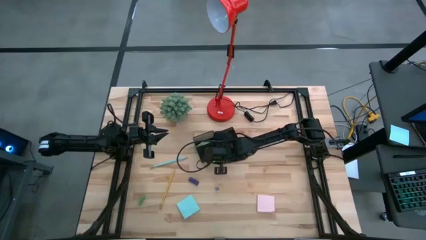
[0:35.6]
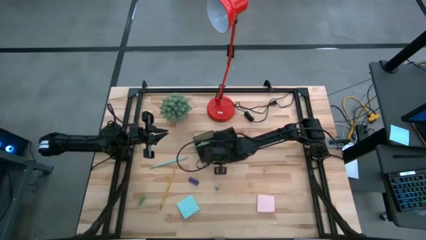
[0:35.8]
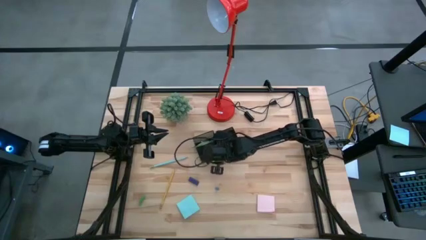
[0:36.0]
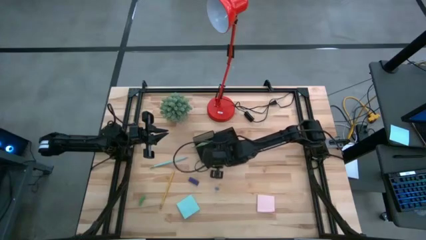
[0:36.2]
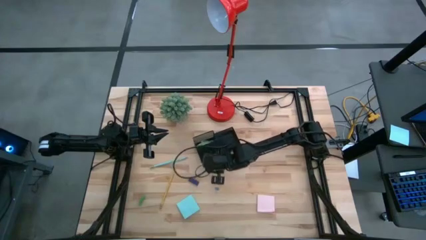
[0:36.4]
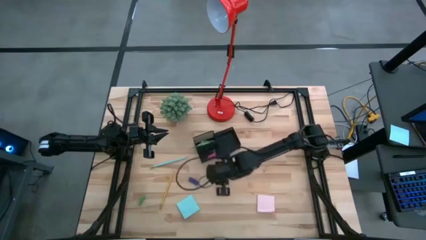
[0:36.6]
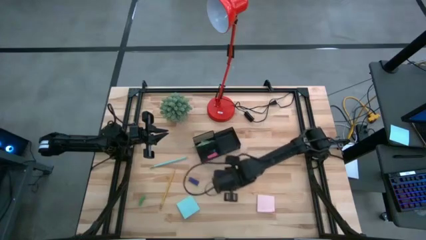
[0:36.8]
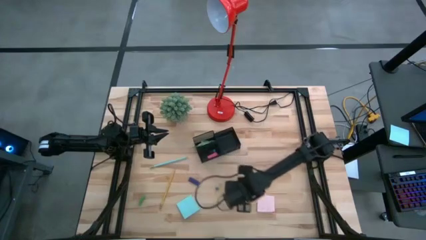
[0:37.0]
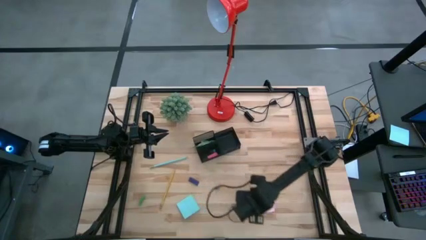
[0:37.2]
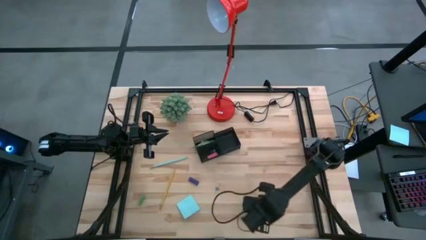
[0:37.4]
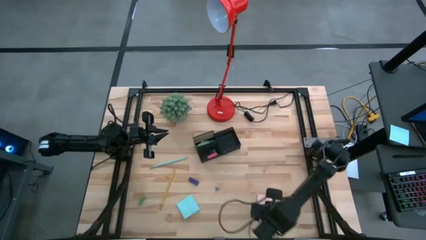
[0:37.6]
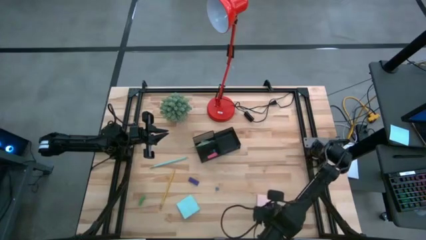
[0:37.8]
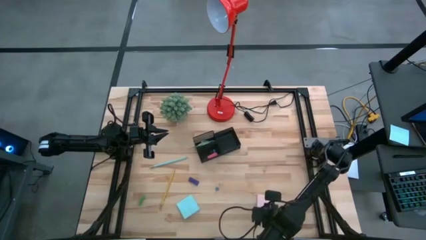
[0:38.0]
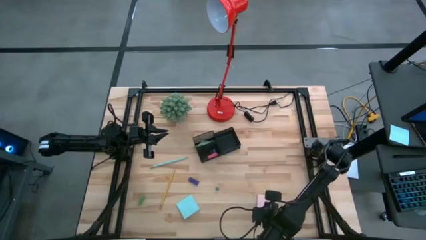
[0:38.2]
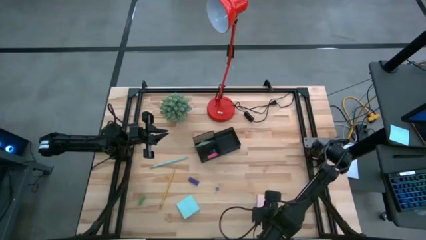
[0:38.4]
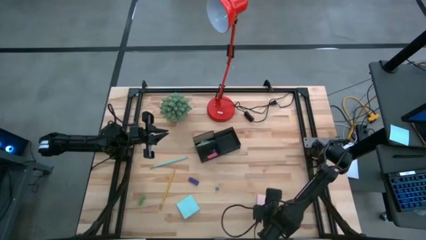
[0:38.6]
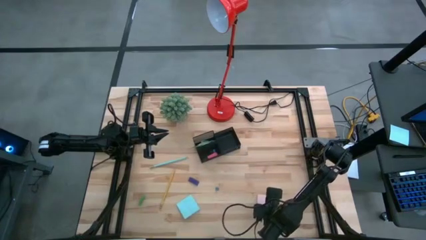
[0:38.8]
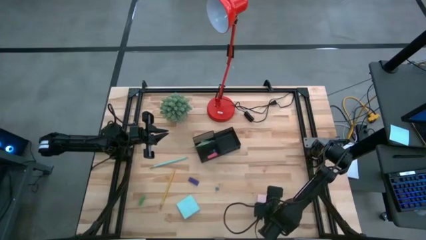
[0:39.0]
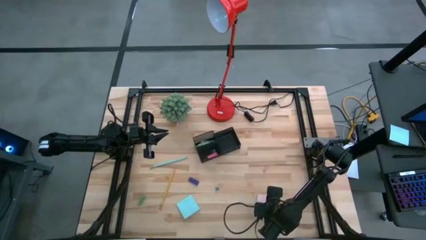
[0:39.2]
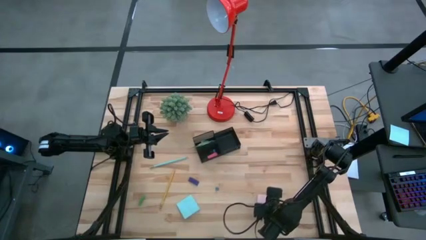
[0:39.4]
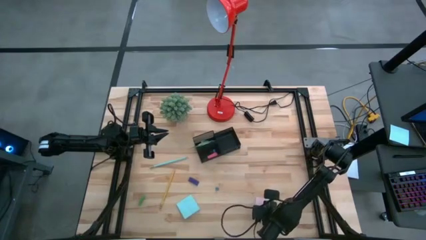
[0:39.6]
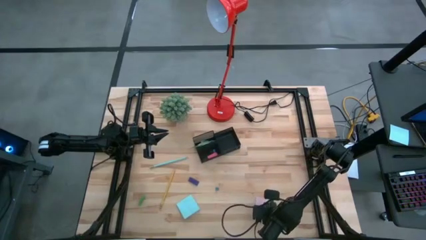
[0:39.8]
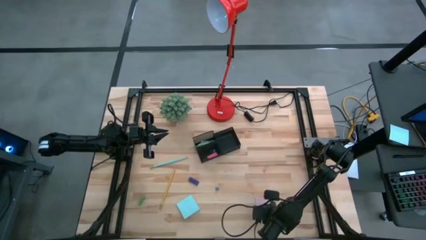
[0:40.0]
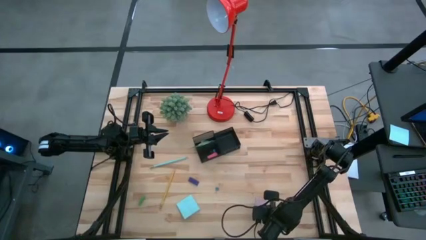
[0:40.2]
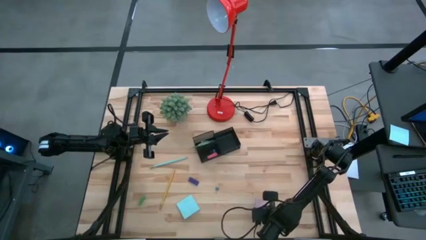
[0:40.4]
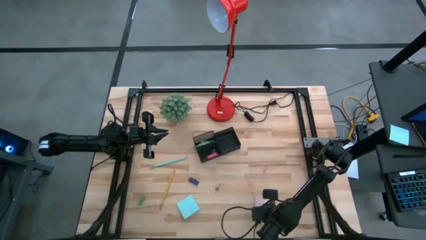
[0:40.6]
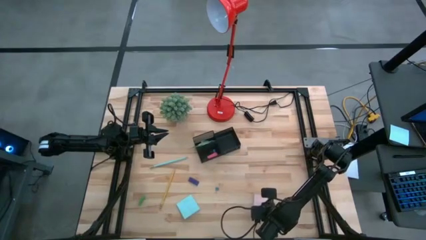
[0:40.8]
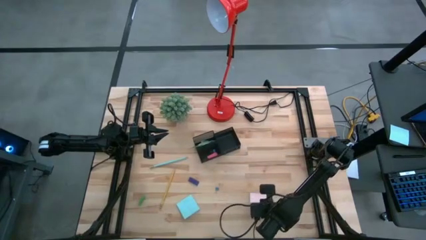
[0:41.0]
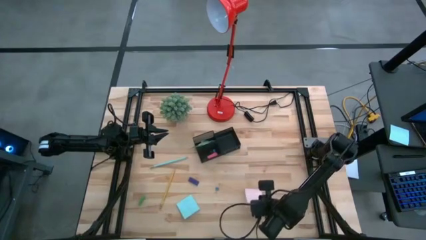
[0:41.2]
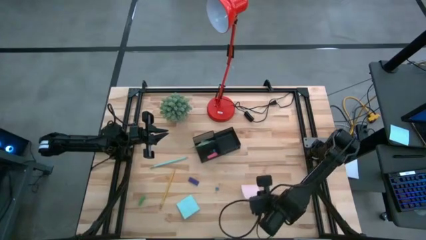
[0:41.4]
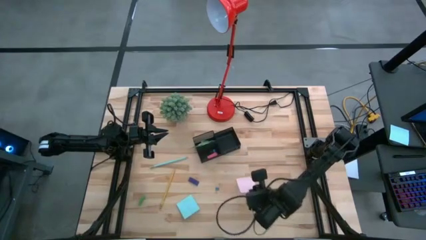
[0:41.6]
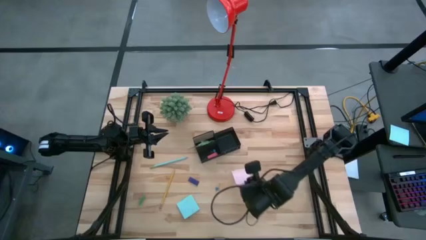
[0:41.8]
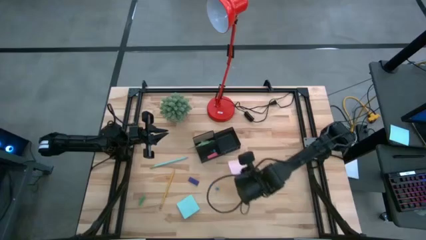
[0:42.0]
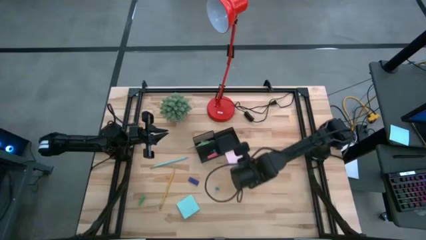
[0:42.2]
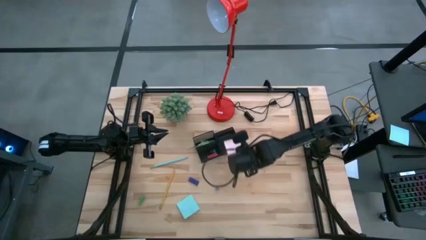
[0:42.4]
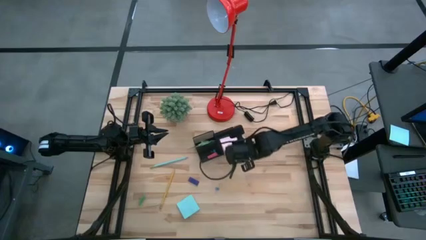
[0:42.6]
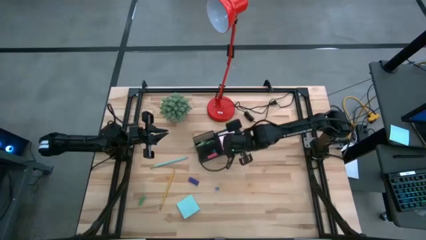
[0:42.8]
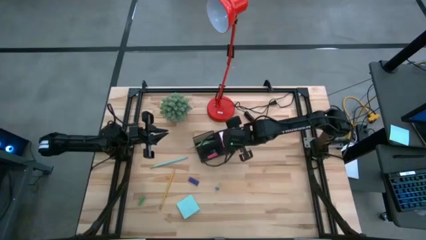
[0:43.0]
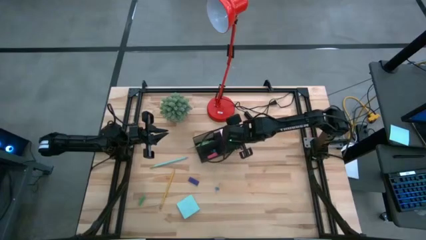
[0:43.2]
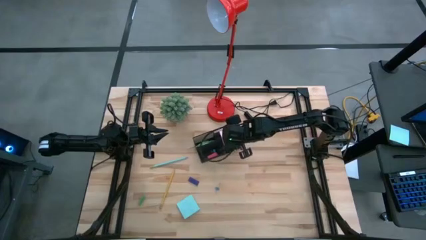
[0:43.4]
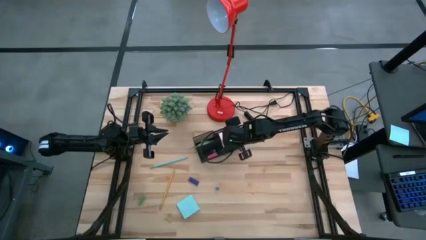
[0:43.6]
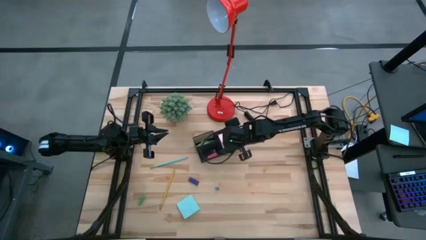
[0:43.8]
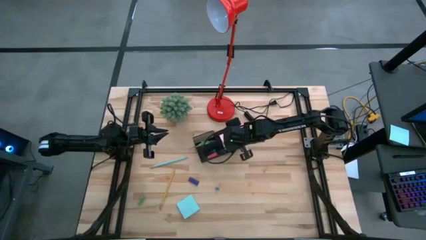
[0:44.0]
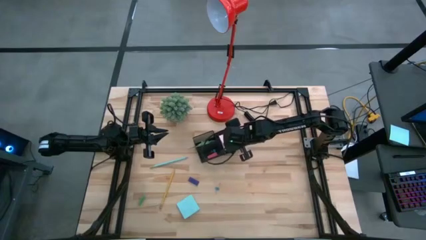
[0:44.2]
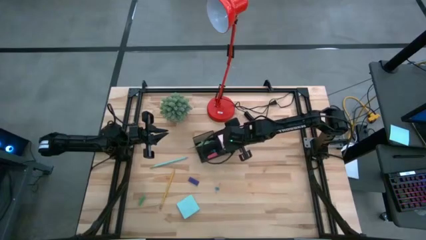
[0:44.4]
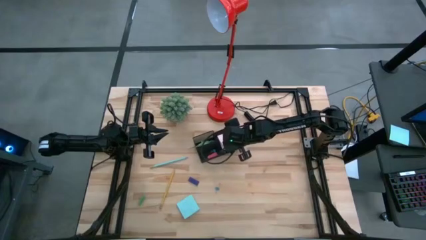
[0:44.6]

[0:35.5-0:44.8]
Task: Pick and place office supplies into organizer
Put the pink sticky notes into the black desk organizer

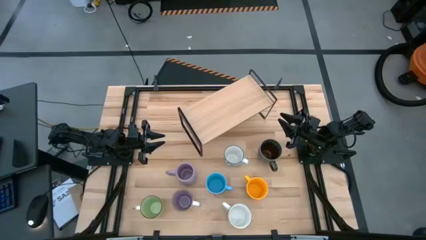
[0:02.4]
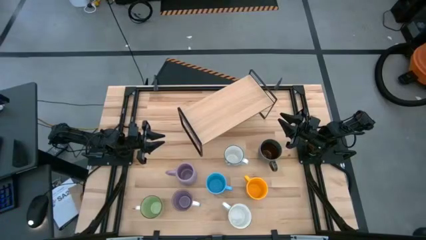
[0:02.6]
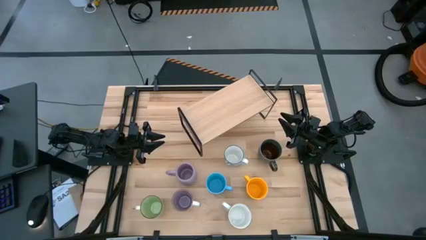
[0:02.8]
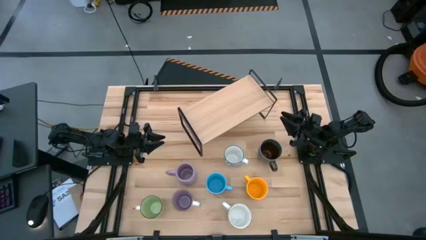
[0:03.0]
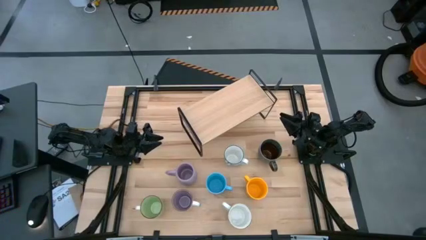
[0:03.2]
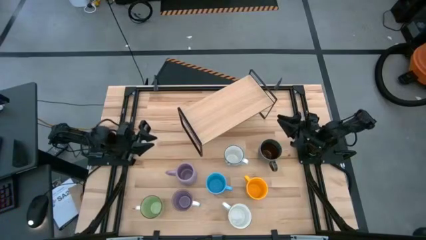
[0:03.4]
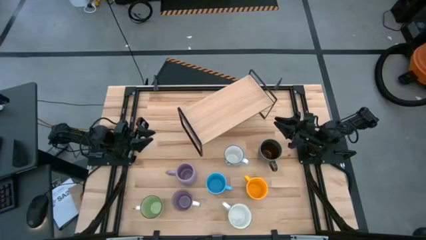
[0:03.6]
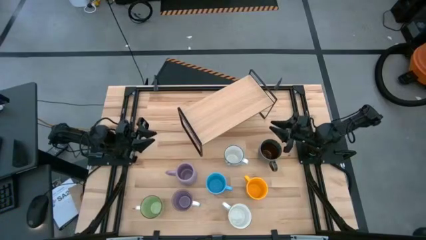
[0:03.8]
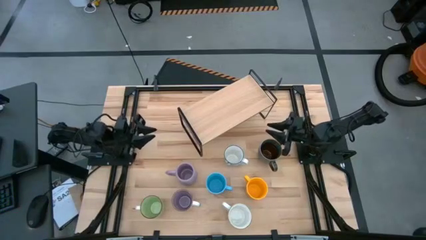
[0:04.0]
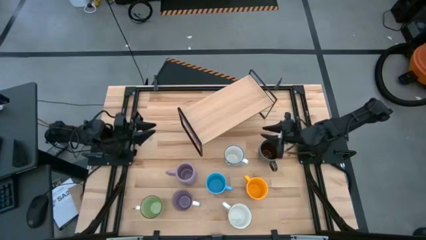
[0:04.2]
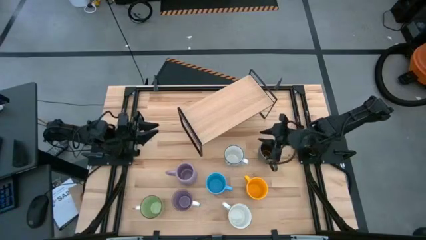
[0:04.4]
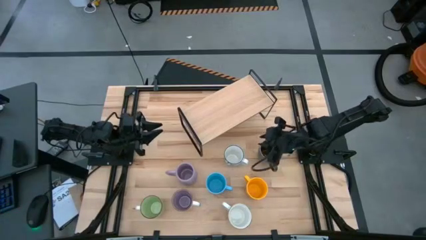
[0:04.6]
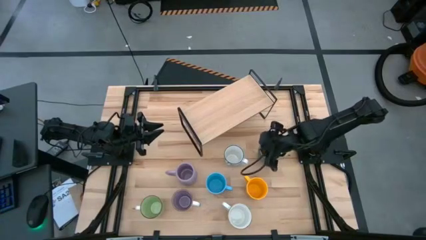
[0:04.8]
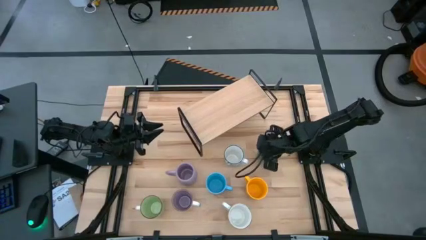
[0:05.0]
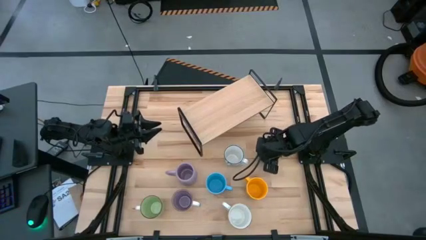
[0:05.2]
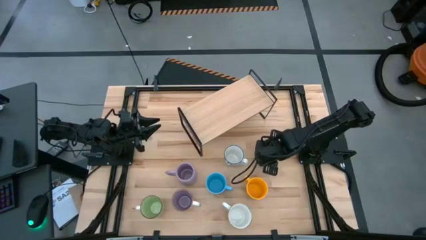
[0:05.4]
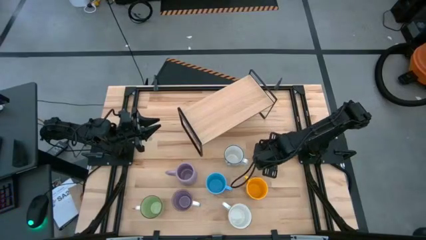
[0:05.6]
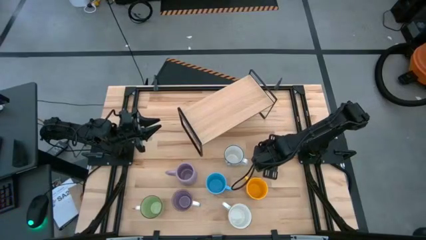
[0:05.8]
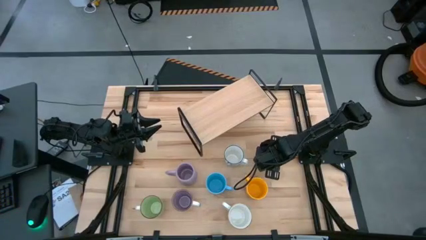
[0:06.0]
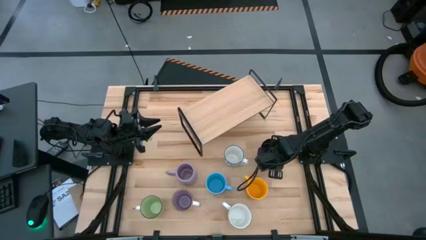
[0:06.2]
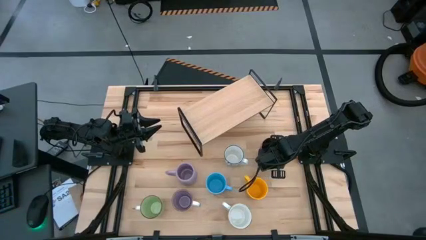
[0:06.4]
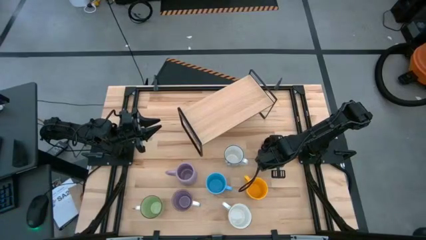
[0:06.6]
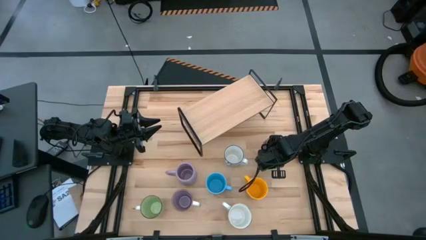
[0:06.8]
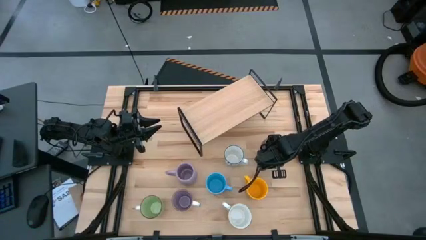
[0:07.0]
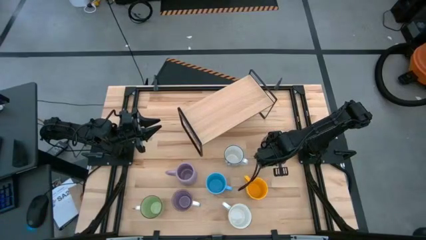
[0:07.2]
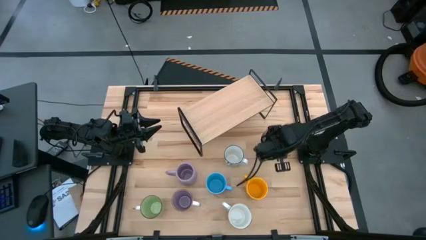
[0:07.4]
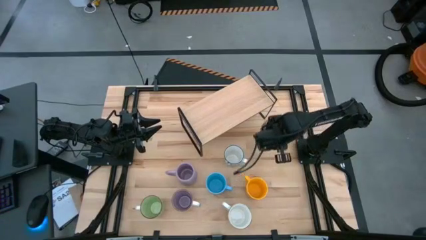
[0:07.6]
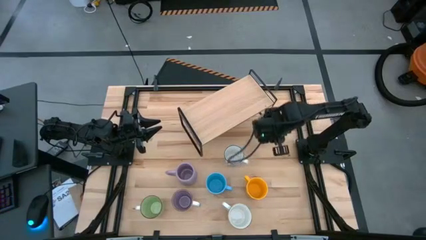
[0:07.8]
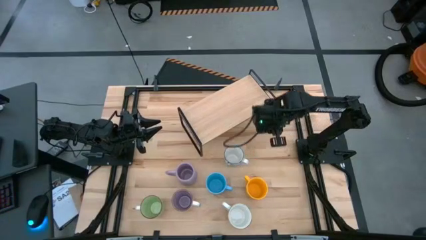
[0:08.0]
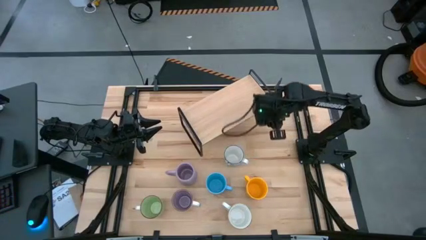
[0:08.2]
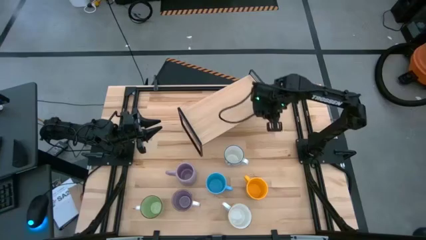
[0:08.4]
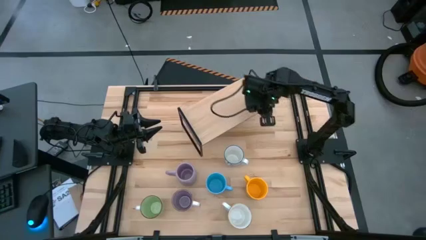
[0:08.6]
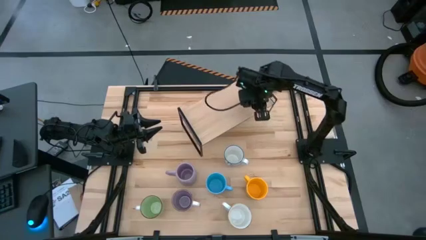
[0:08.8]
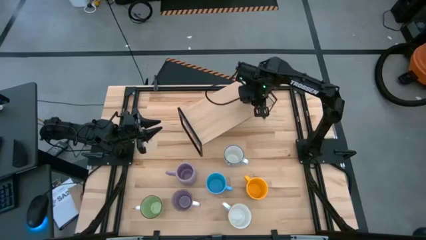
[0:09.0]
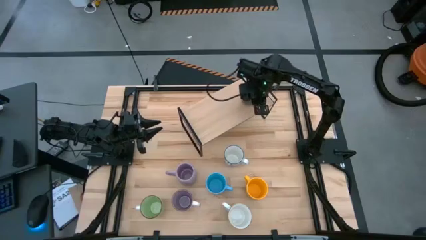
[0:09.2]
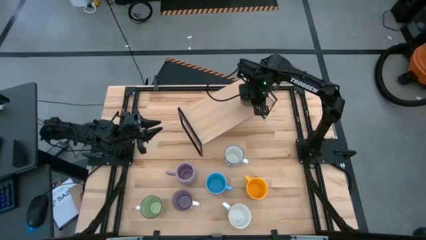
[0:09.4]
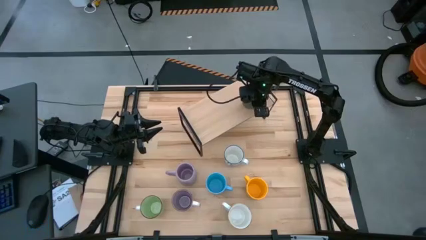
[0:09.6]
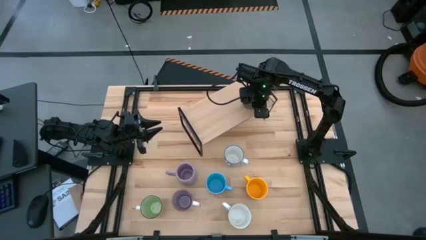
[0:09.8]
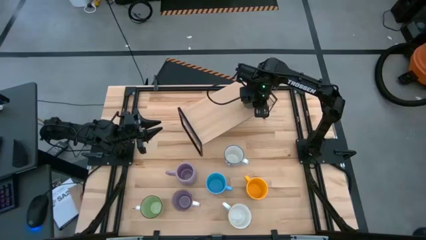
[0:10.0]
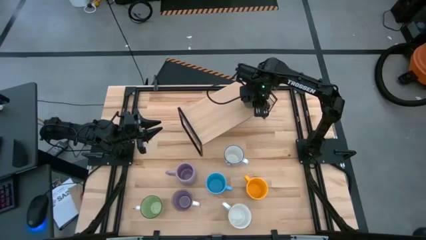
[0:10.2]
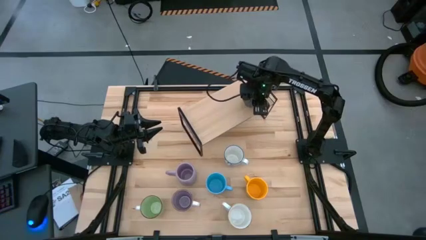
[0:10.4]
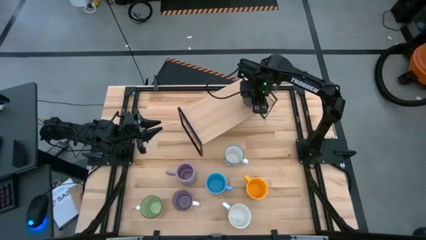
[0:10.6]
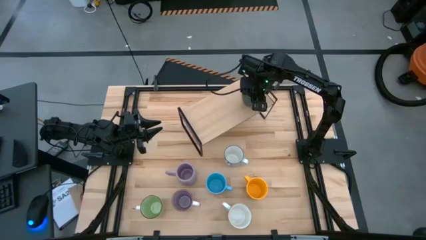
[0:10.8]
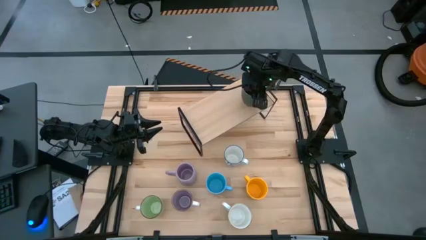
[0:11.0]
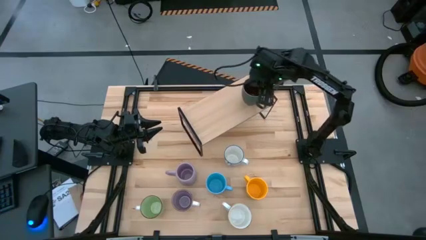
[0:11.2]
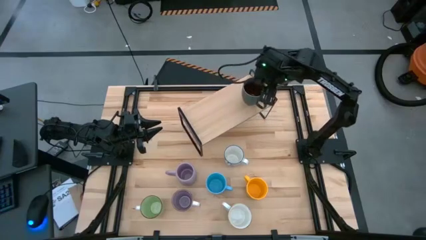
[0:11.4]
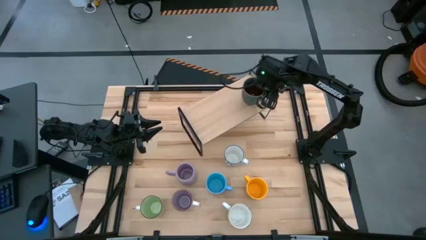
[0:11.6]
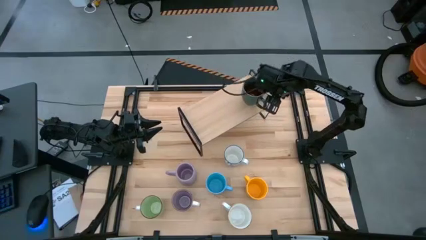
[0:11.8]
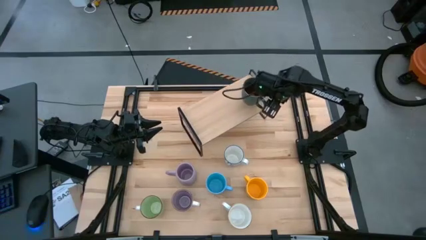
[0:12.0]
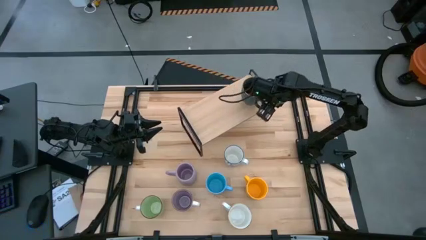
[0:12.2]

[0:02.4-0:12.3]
Task: Place coffee mugs
Put the dark blue cup on the shelf
